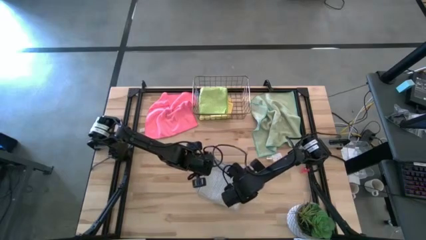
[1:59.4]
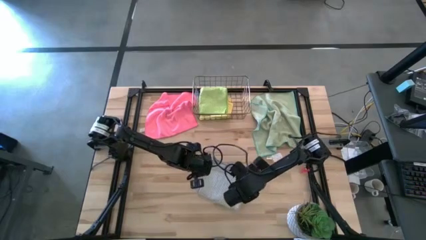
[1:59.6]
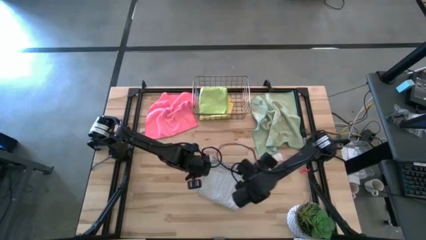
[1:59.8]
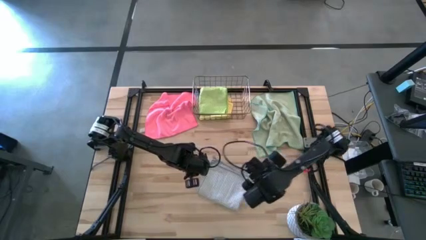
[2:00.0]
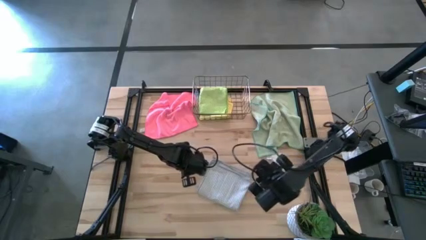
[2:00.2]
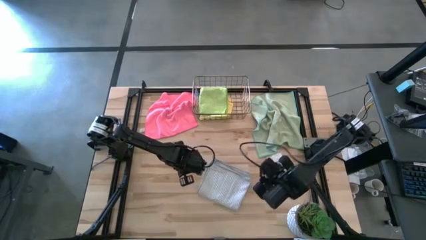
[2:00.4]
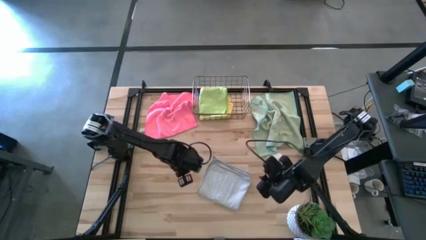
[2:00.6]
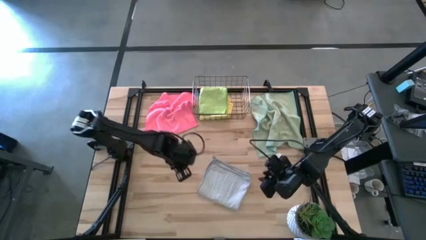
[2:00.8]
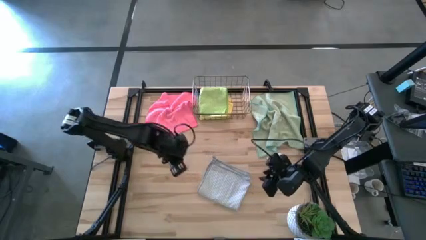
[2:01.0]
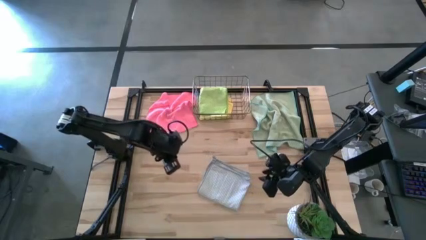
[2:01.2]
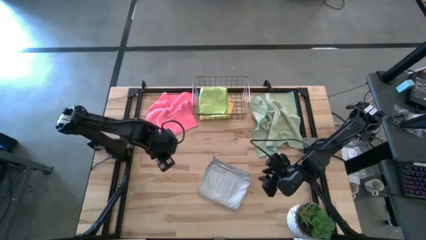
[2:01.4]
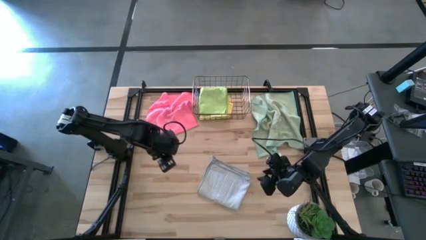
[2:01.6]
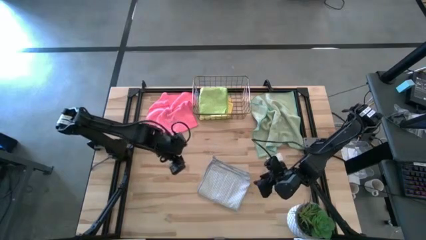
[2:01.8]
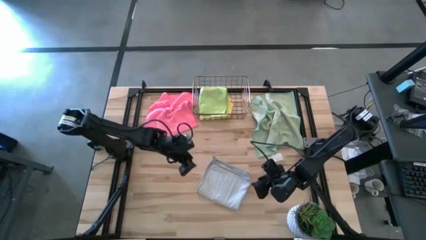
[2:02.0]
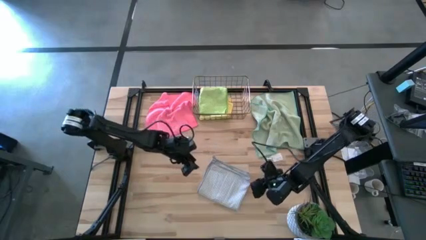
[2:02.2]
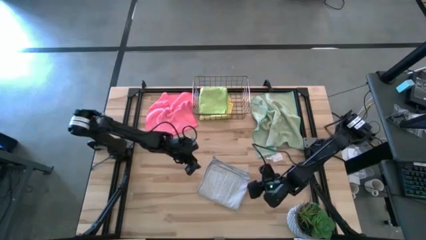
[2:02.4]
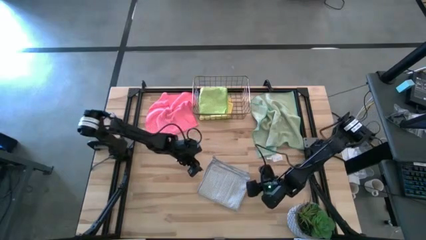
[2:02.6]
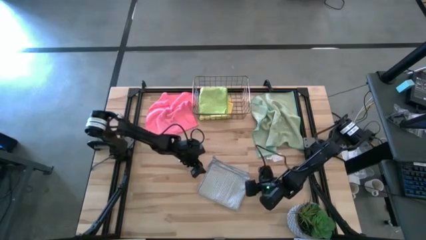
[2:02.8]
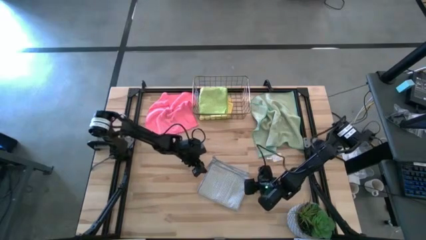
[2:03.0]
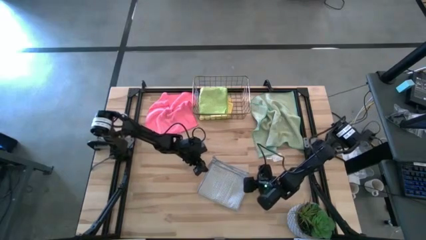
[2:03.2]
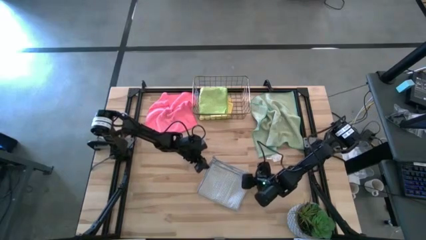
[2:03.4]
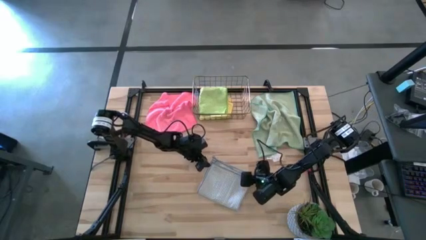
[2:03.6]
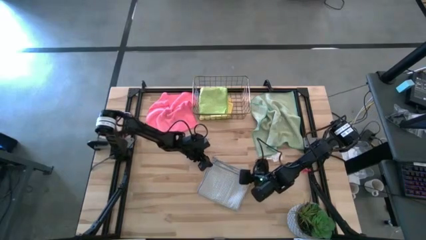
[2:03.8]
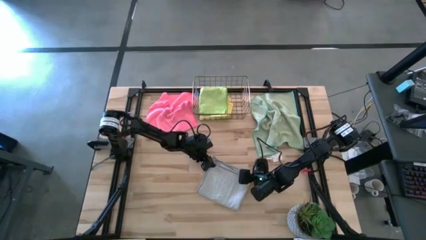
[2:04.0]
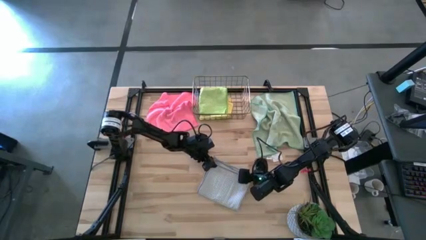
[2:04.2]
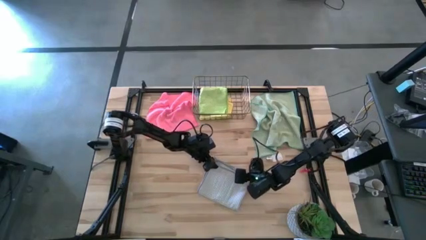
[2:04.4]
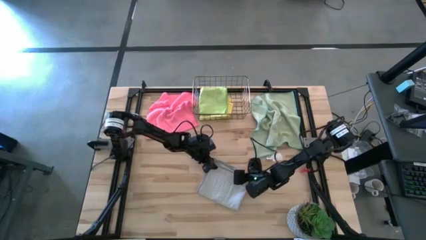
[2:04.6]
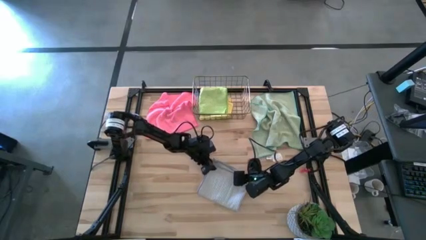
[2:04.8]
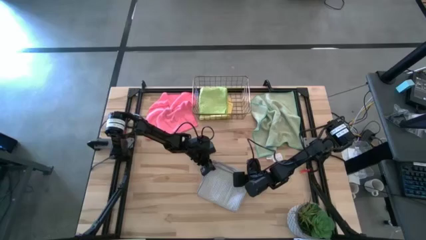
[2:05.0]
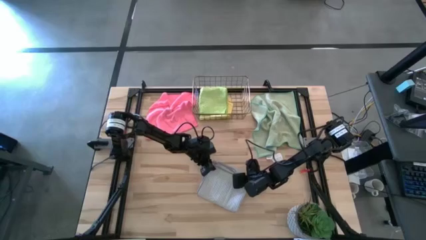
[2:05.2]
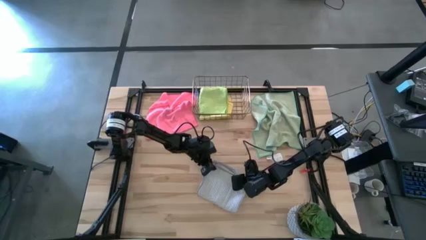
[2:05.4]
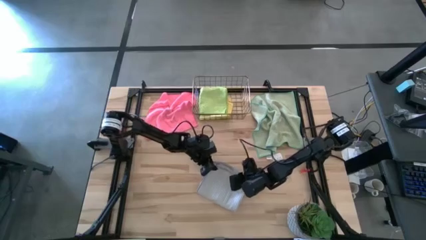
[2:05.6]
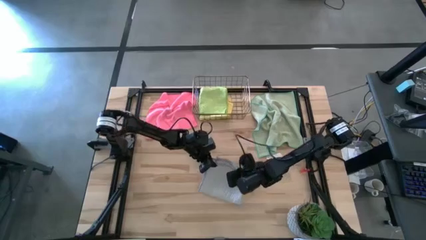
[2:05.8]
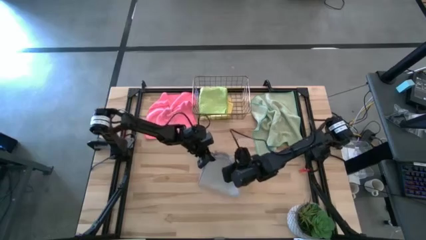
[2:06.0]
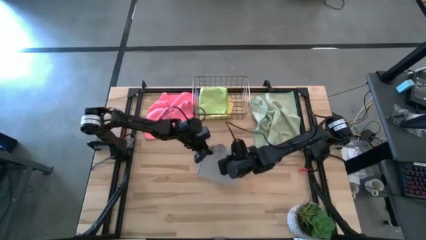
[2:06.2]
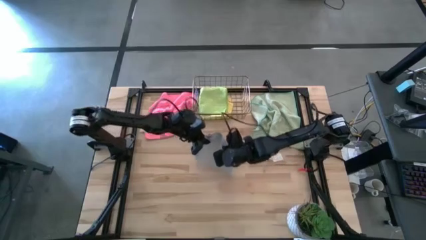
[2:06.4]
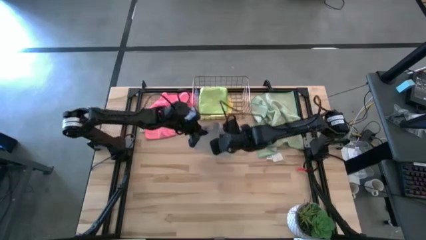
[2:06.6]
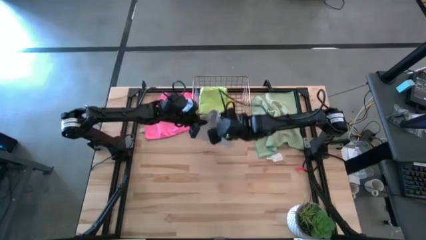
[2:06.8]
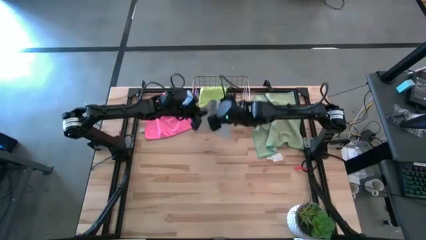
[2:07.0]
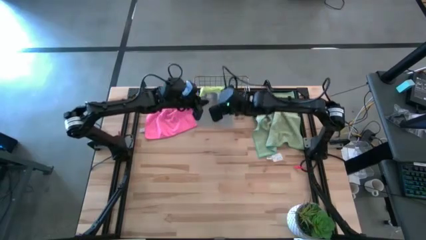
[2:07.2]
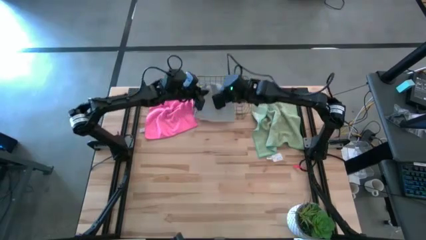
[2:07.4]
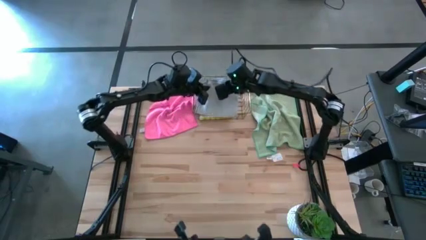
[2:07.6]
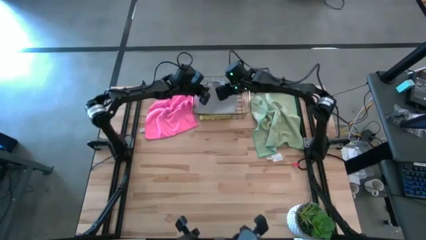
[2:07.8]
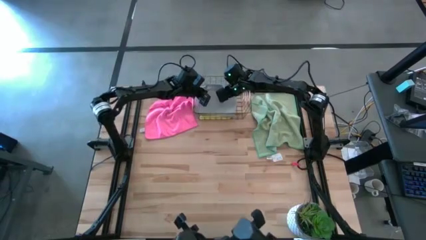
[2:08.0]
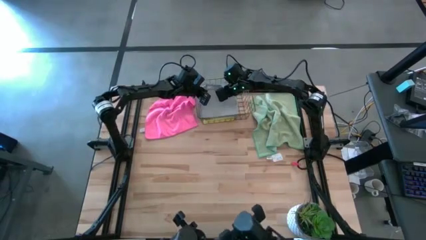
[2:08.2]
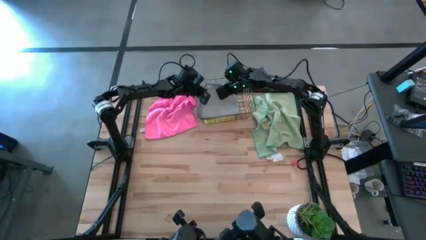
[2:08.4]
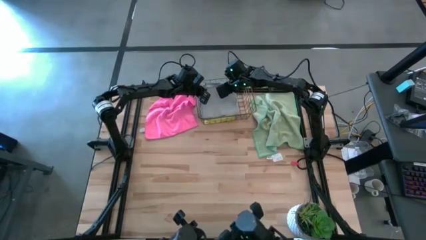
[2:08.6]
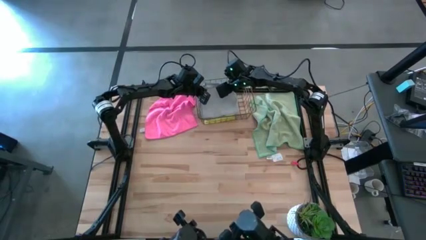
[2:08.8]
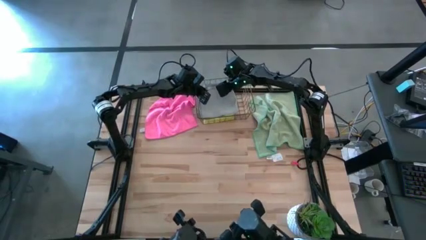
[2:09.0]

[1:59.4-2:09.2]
Task: Fold microfiber towels
Put the gray towel into the wire basket

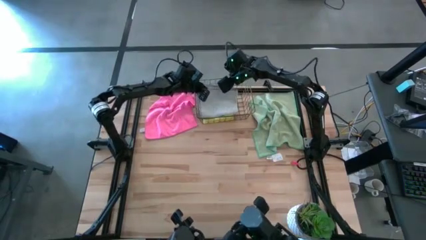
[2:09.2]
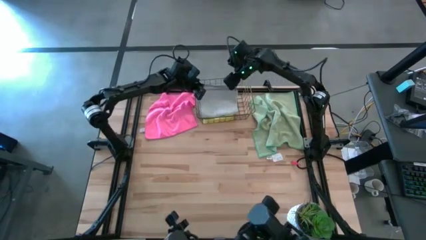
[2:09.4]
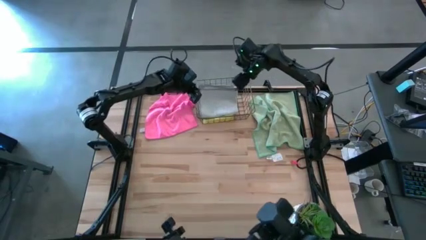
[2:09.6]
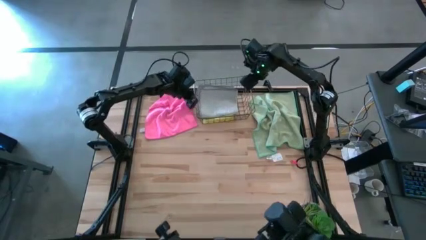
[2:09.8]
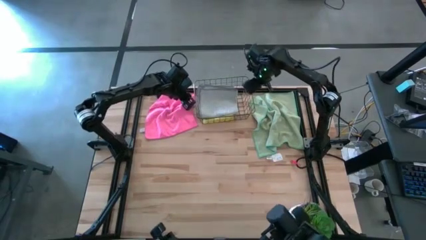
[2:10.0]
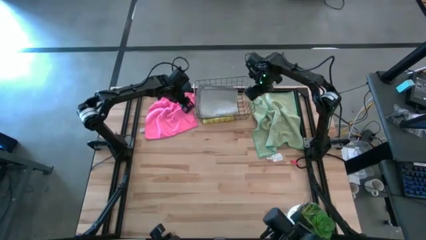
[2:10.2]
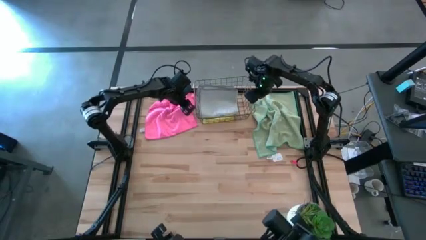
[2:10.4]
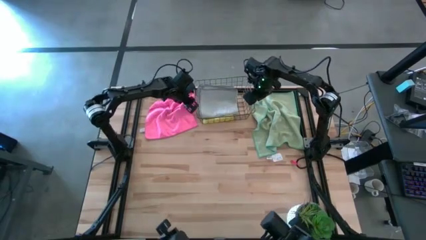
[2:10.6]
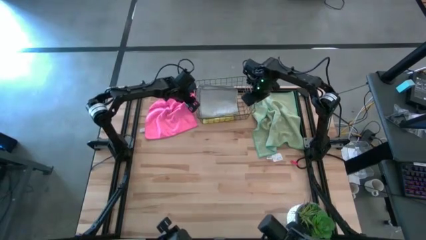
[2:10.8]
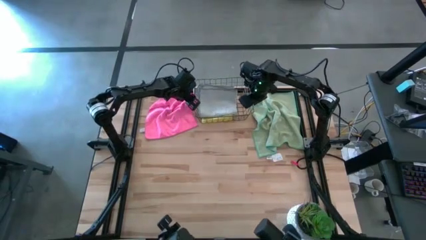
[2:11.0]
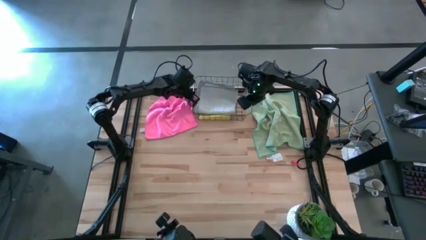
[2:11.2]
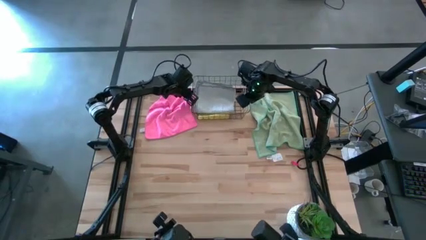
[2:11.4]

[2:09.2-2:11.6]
Adjust the wire basket
